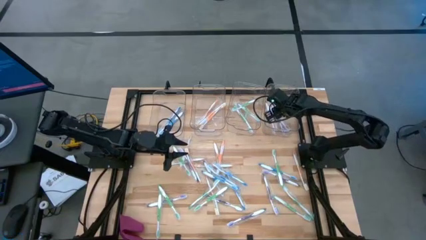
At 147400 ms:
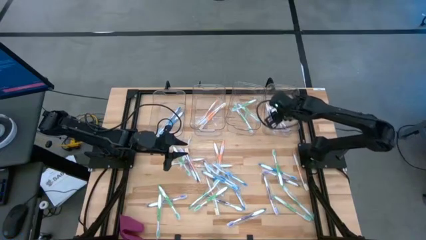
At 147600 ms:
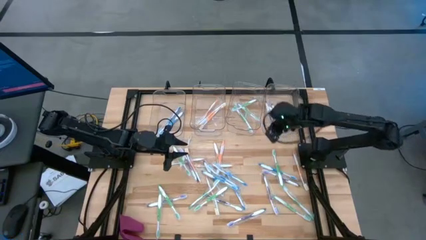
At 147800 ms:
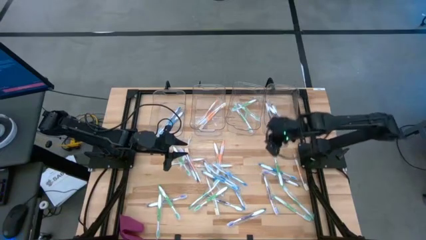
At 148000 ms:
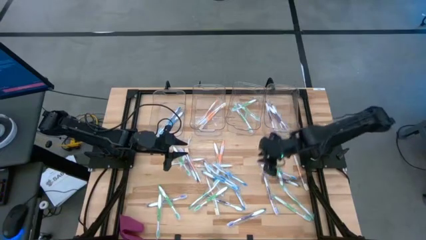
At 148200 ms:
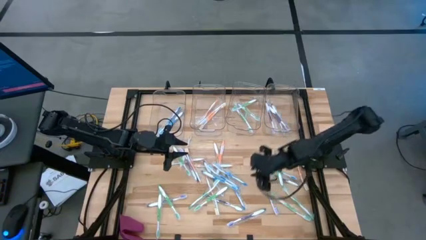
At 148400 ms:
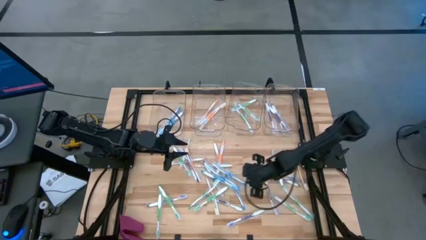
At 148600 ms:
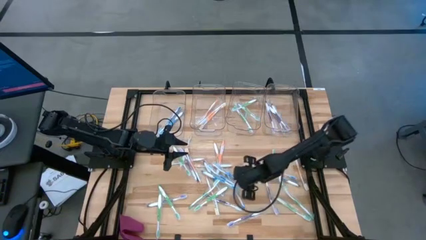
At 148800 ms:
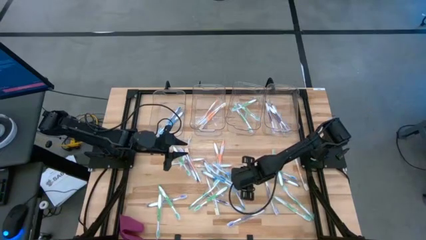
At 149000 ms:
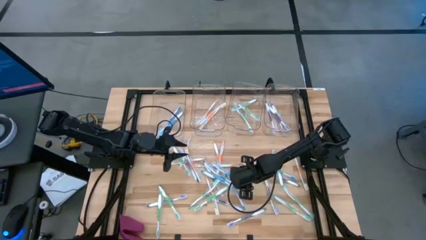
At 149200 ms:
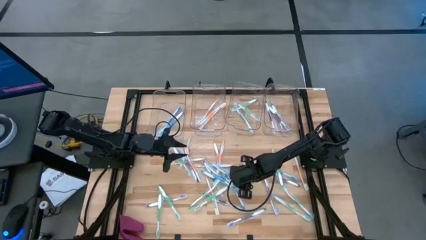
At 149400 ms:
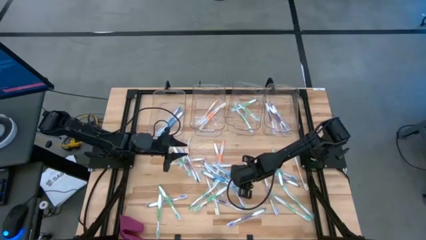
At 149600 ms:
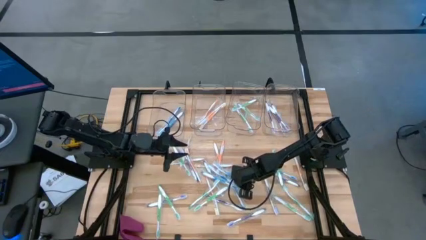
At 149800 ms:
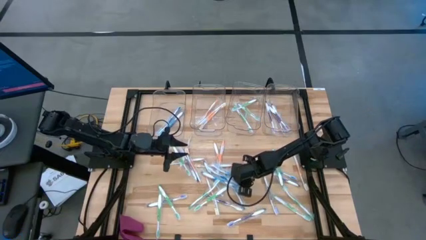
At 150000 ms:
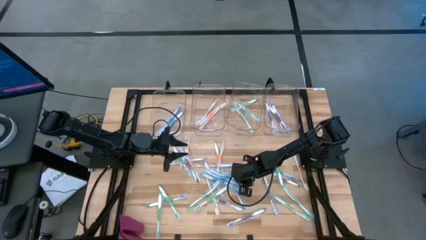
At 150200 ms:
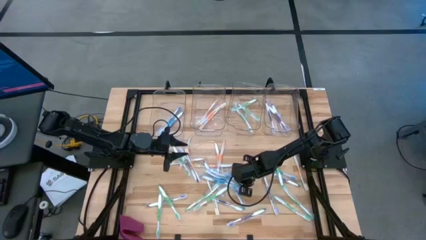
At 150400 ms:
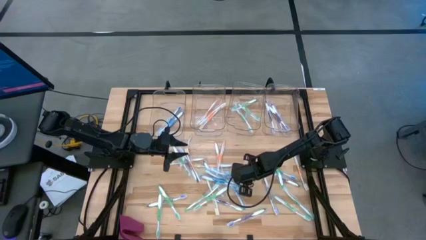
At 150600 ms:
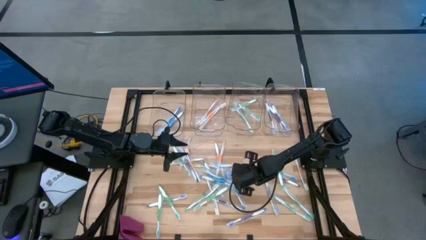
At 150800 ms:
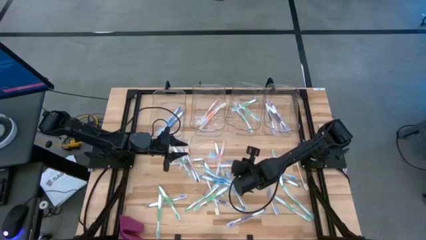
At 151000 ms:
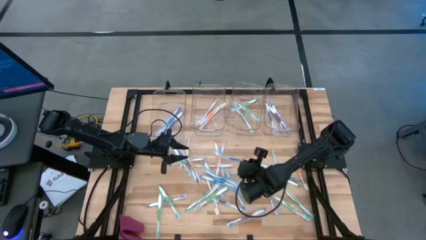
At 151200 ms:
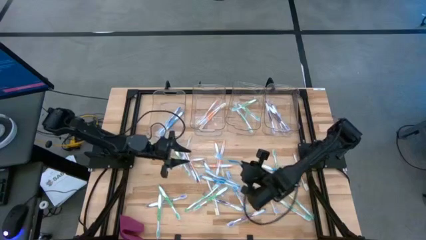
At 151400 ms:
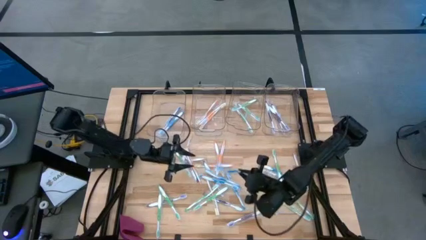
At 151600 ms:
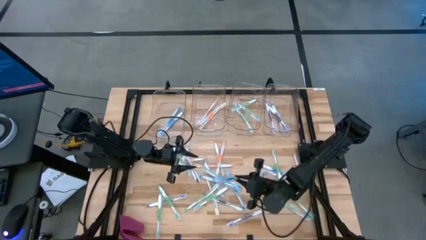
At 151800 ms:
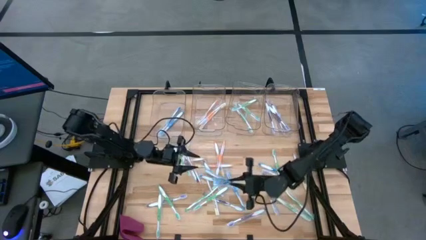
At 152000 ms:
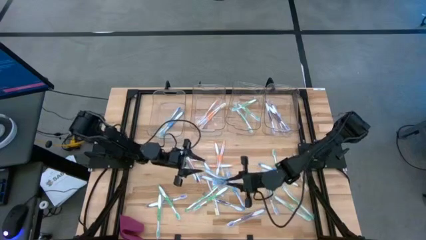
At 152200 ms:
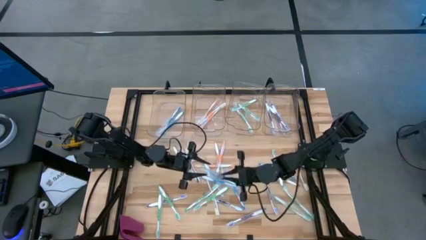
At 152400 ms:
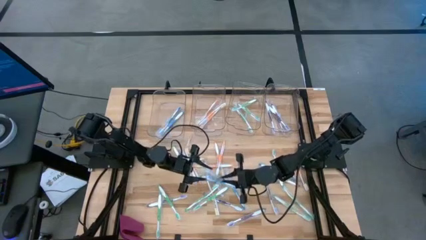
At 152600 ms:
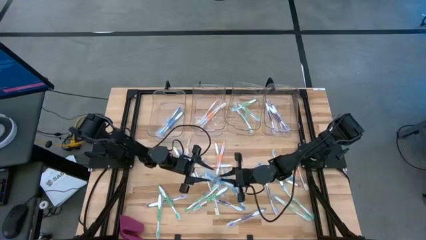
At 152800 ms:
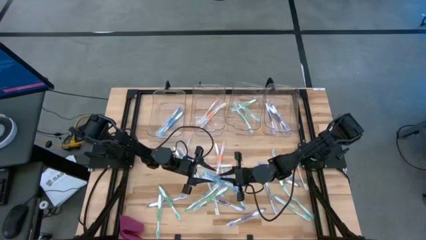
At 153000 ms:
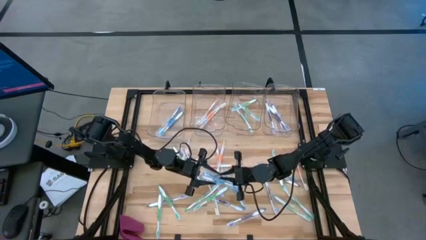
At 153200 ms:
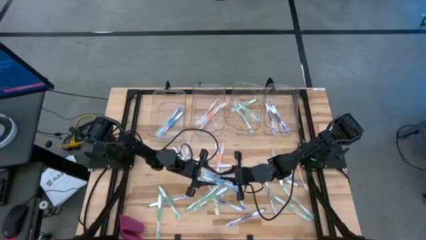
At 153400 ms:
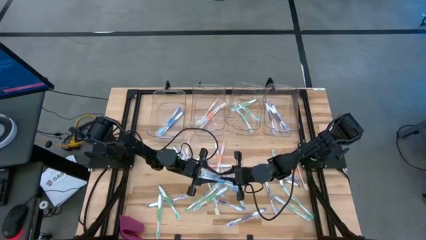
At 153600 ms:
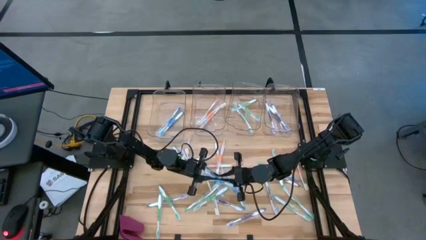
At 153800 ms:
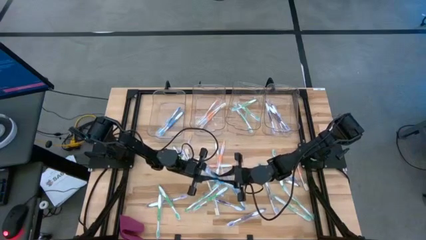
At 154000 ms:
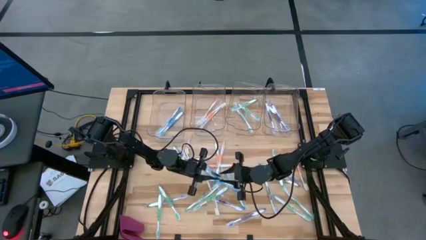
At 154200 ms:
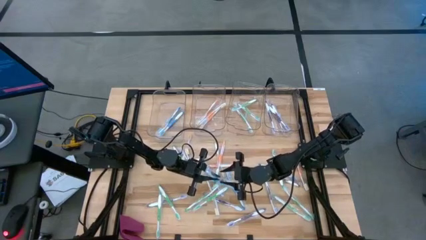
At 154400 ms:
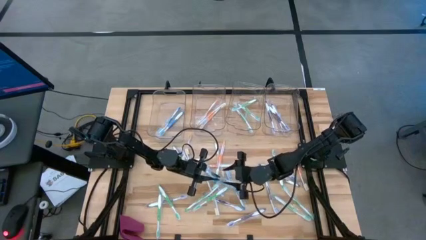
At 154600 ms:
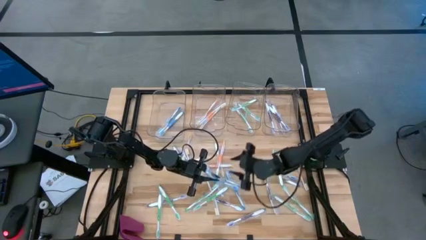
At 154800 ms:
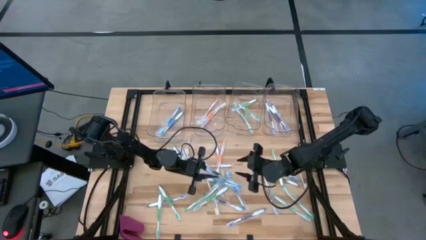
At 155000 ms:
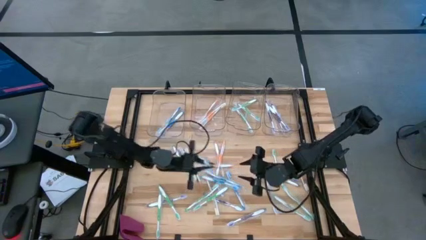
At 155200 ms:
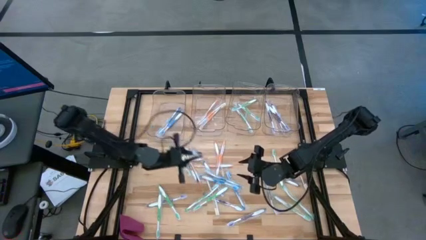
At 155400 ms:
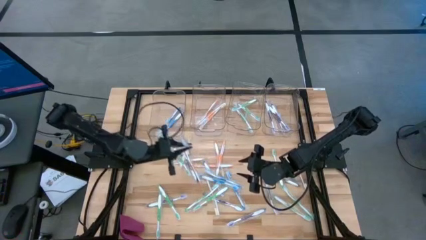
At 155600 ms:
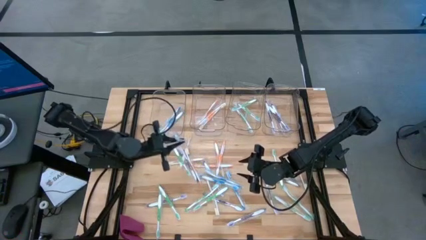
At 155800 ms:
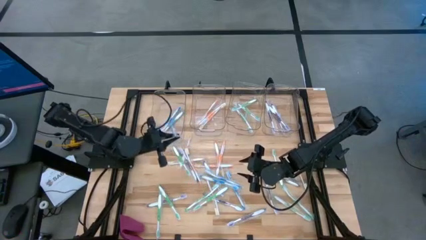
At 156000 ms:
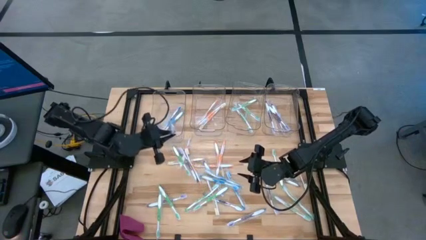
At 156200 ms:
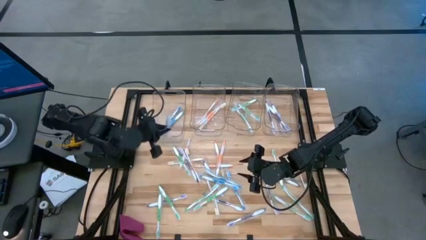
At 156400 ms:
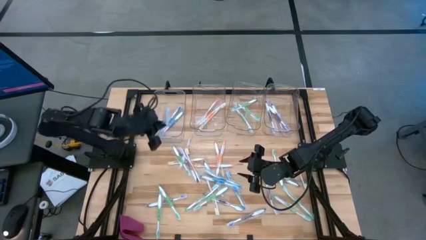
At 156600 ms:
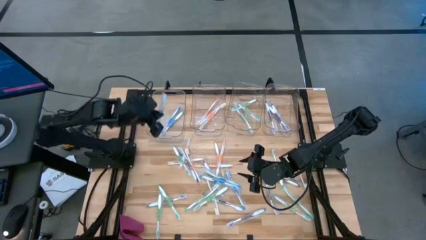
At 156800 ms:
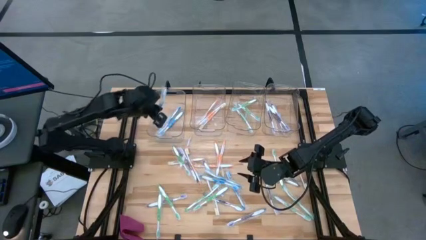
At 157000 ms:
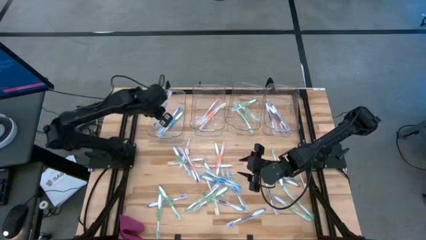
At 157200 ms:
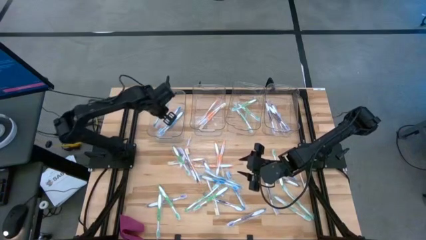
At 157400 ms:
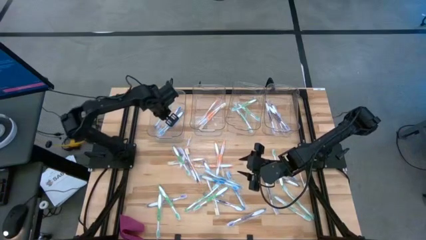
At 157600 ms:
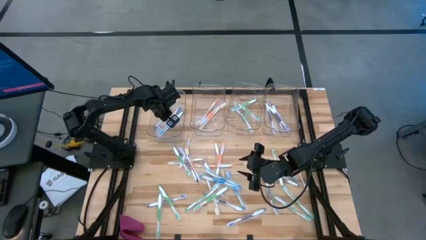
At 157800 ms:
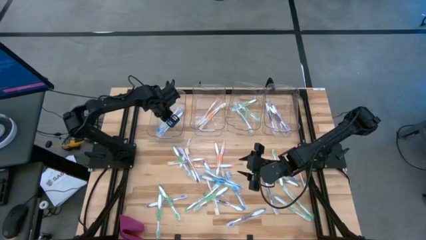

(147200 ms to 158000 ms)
Task: Pick & Place Toothbrushes
Put the blue toothbrush into the left transparent bin

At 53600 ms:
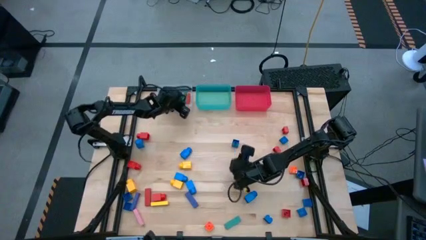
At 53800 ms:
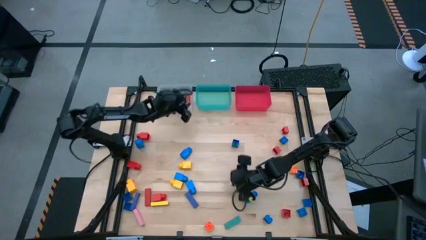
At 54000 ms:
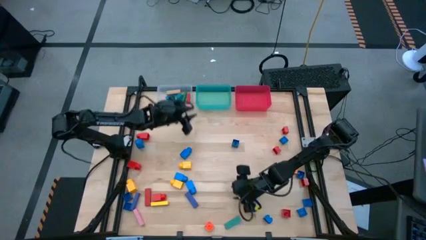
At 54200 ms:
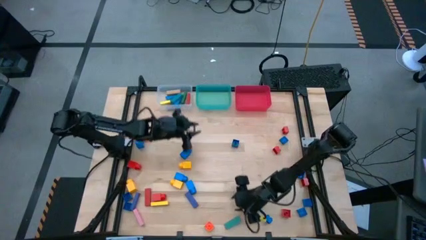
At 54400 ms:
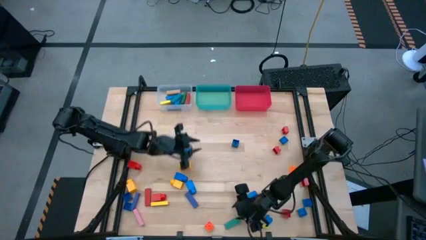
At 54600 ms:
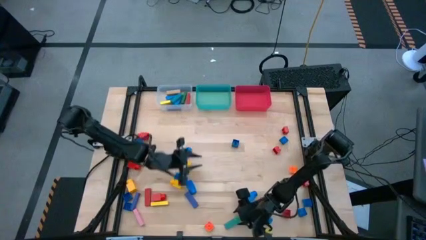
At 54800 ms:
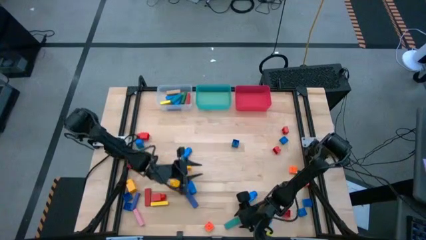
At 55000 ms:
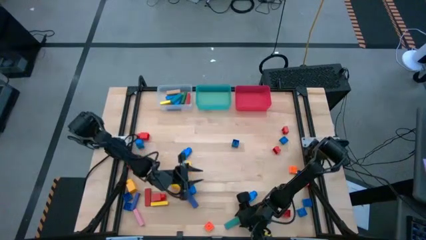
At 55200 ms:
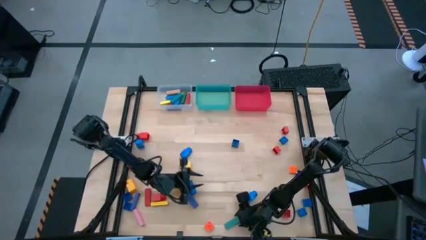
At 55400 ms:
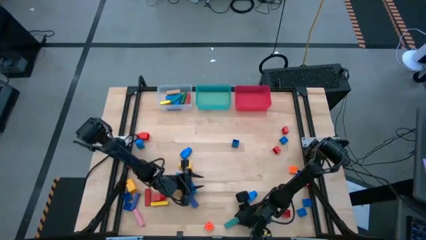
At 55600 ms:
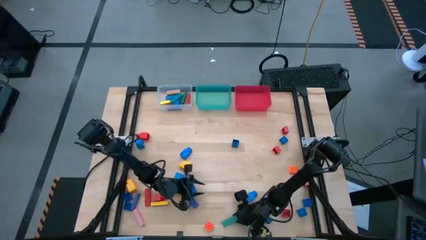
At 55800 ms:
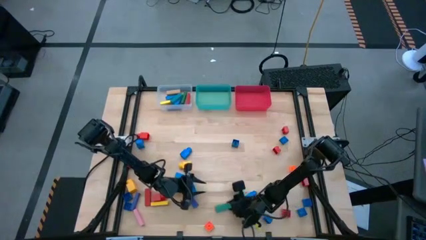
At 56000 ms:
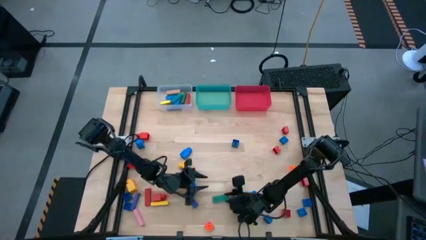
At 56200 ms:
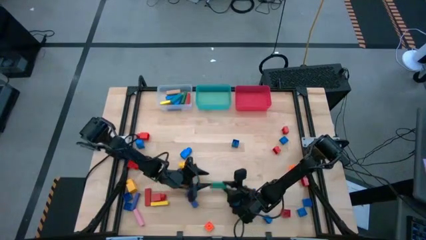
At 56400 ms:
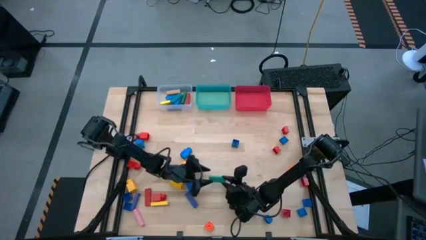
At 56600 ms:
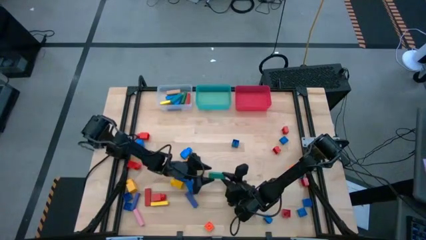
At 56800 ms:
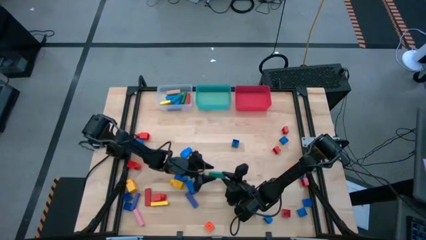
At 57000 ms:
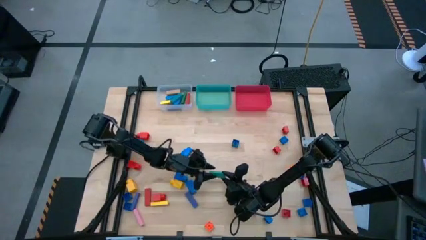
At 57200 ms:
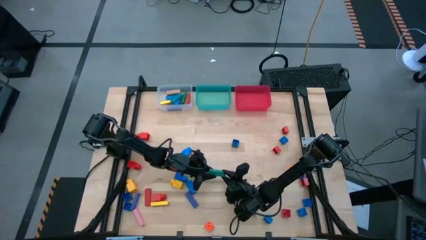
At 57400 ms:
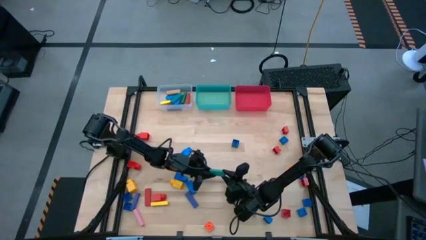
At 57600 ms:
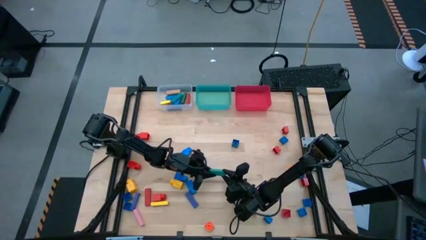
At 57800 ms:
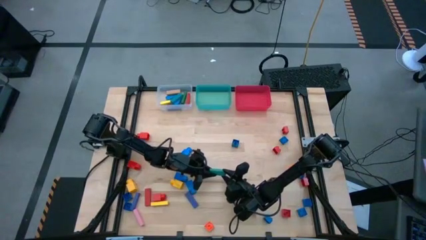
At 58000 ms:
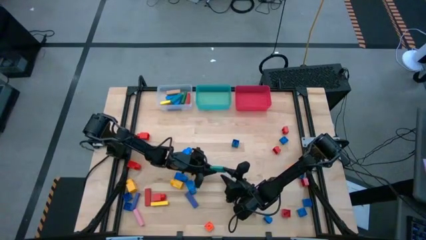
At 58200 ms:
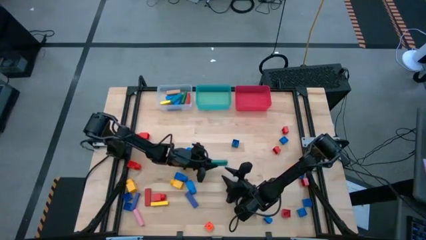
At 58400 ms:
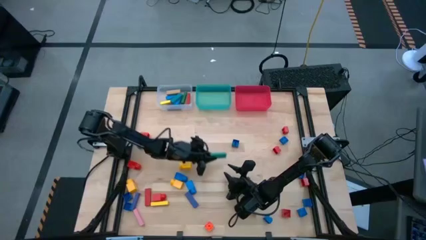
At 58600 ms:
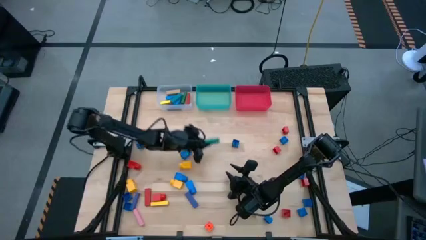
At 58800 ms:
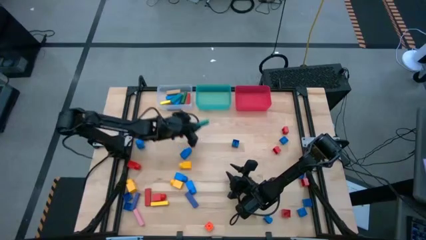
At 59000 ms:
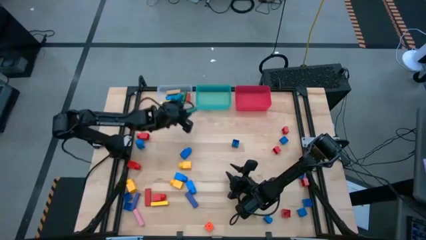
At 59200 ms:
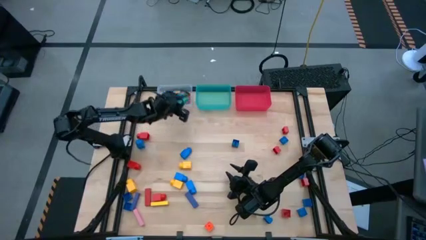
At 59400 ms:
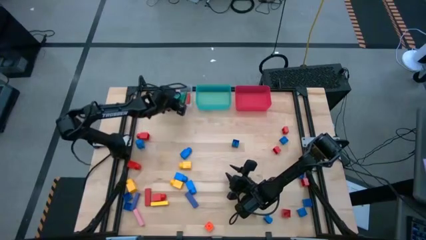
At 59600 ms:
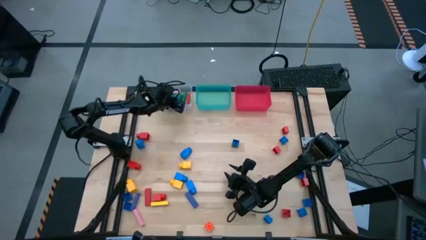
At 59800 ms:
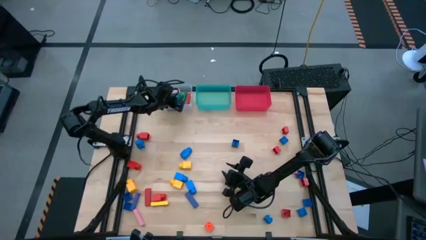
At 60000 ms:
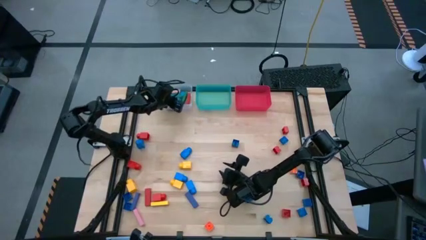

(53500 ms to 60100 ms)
Task: Sort blocks by size
Put the green block into the transparent bin
